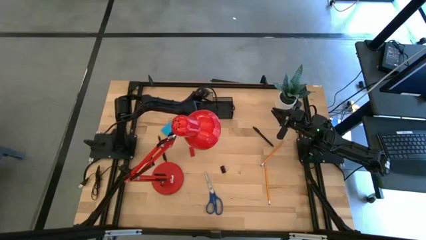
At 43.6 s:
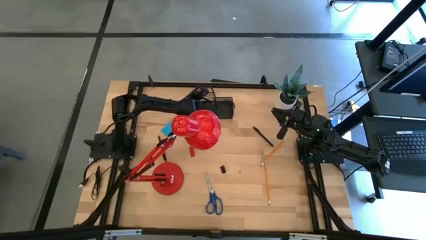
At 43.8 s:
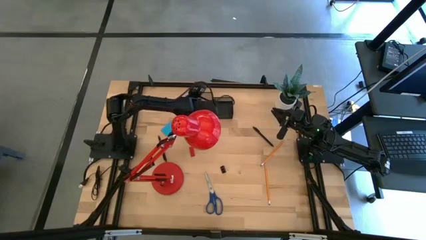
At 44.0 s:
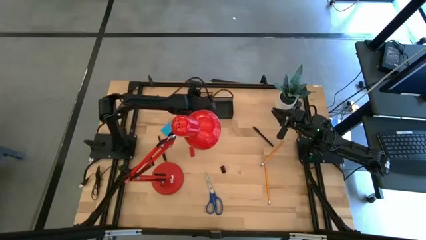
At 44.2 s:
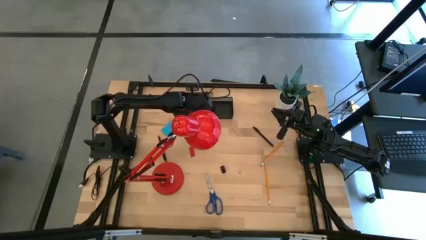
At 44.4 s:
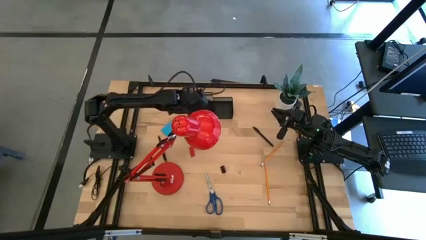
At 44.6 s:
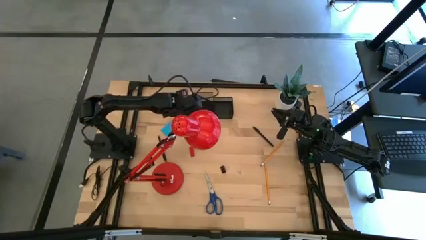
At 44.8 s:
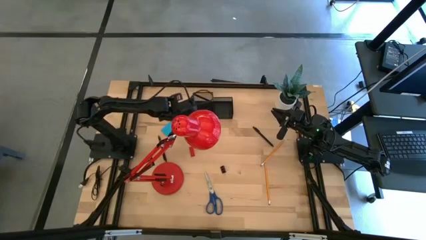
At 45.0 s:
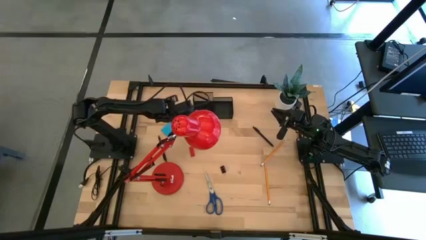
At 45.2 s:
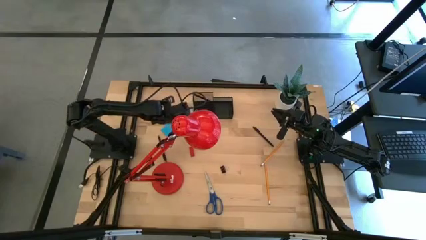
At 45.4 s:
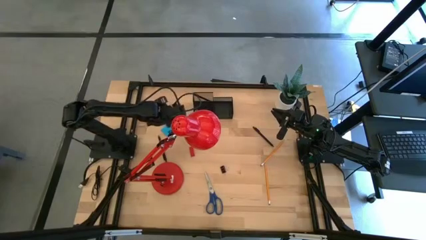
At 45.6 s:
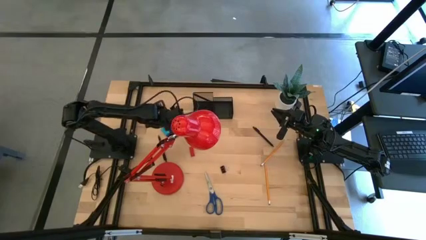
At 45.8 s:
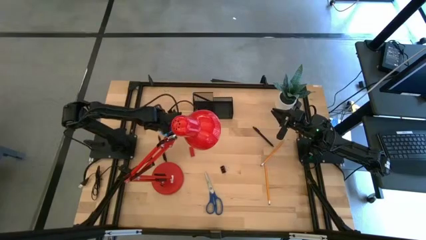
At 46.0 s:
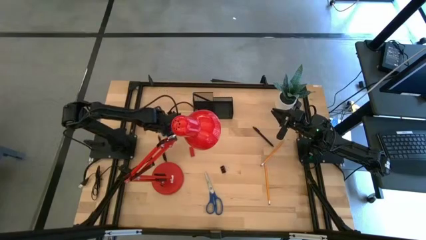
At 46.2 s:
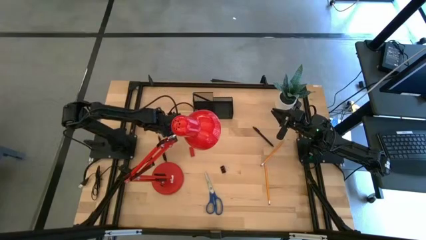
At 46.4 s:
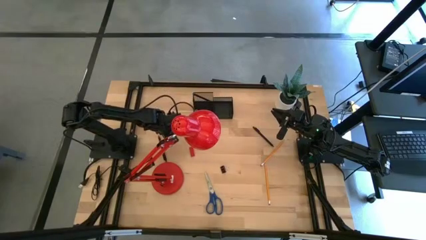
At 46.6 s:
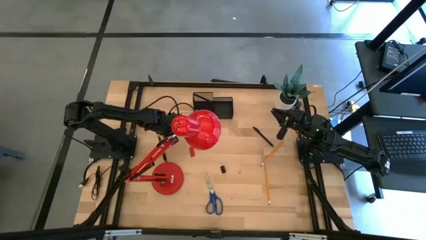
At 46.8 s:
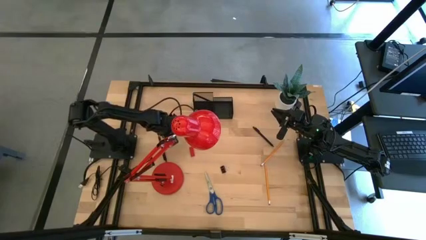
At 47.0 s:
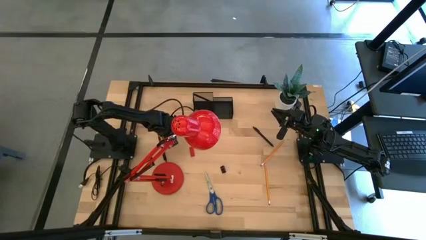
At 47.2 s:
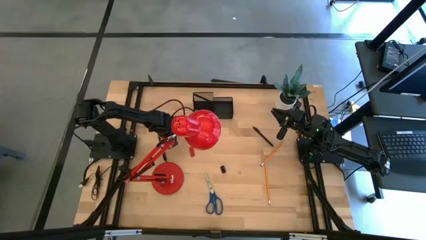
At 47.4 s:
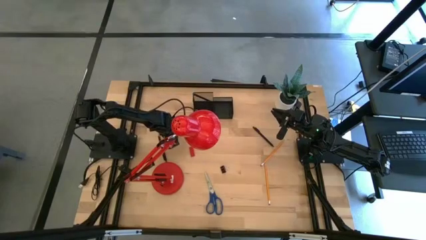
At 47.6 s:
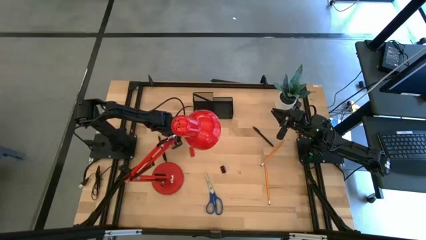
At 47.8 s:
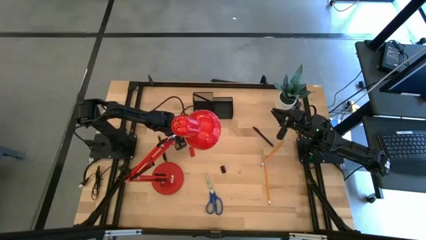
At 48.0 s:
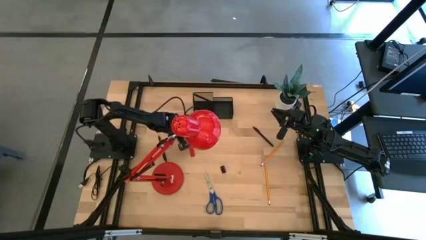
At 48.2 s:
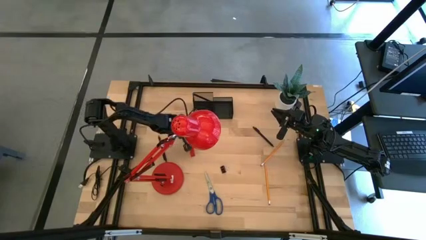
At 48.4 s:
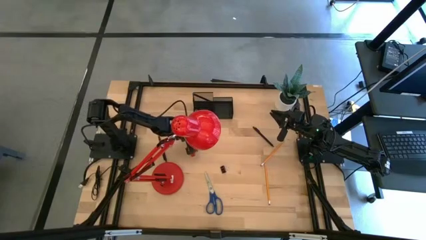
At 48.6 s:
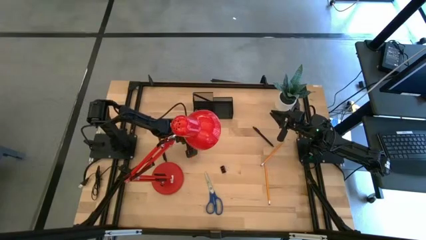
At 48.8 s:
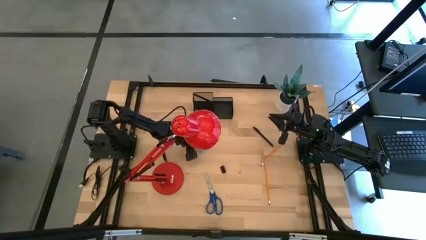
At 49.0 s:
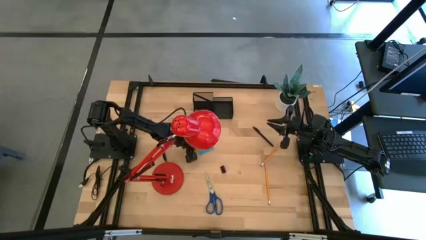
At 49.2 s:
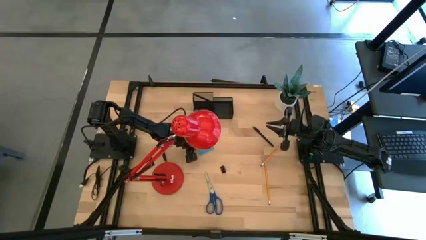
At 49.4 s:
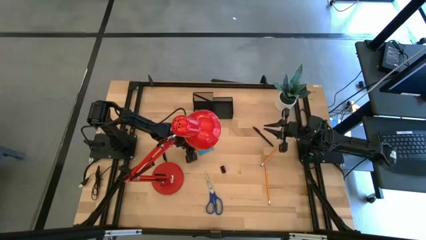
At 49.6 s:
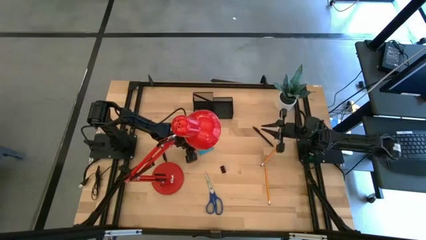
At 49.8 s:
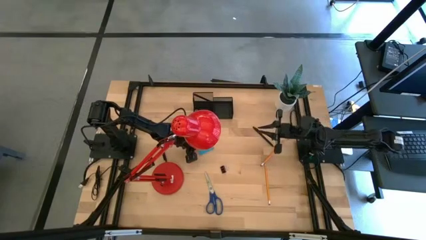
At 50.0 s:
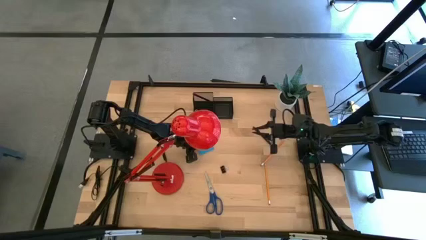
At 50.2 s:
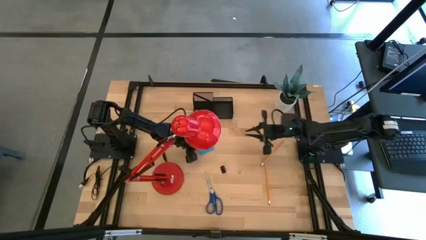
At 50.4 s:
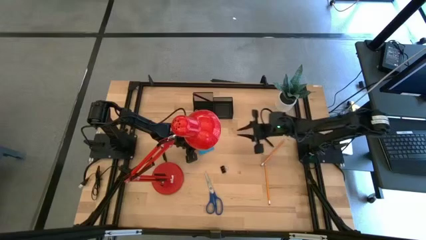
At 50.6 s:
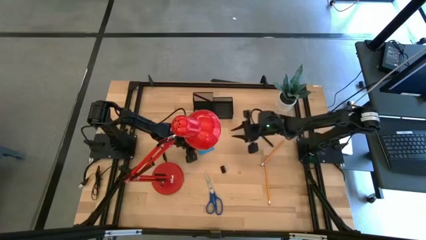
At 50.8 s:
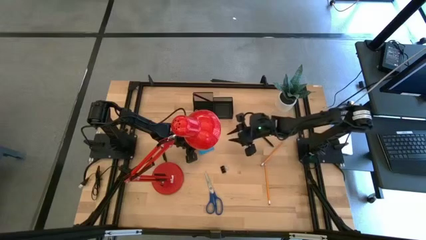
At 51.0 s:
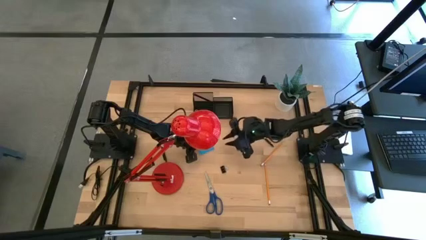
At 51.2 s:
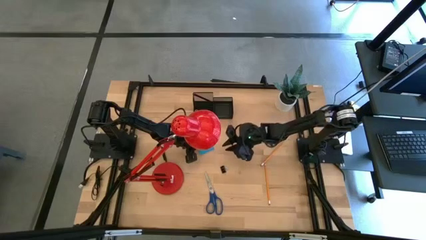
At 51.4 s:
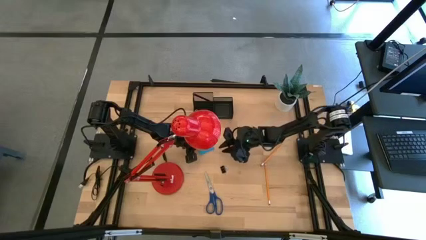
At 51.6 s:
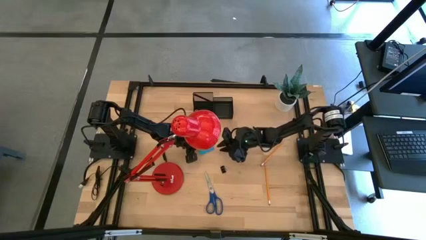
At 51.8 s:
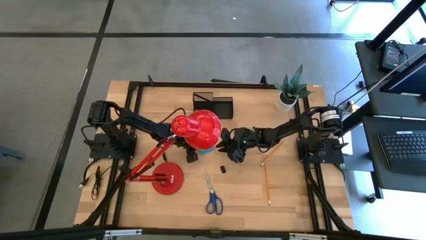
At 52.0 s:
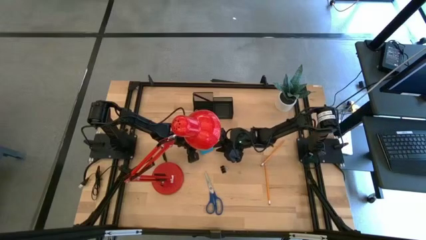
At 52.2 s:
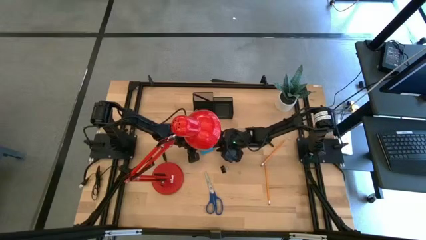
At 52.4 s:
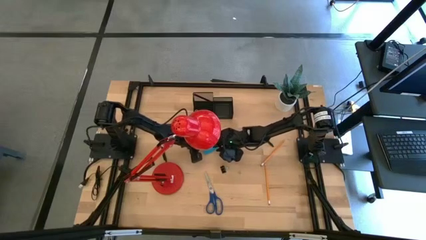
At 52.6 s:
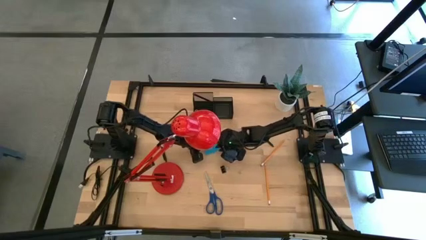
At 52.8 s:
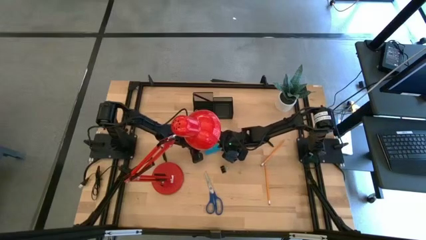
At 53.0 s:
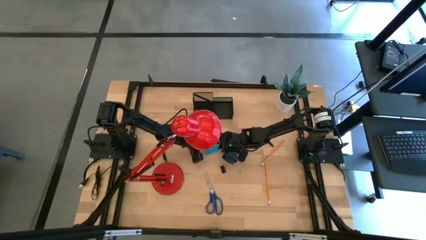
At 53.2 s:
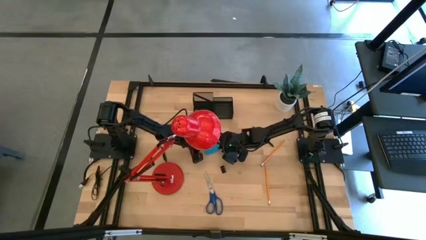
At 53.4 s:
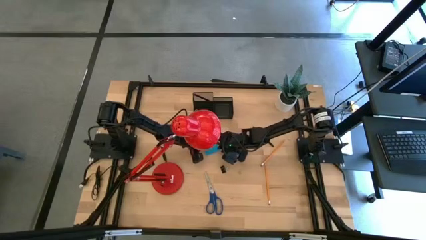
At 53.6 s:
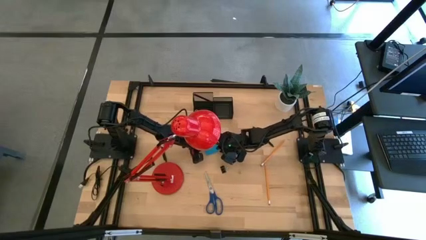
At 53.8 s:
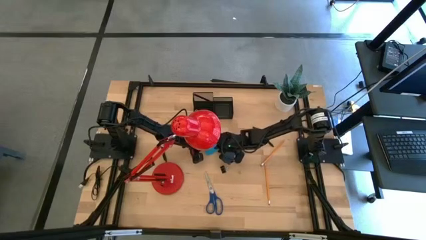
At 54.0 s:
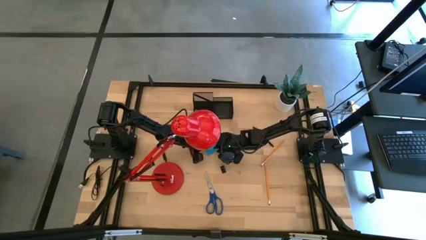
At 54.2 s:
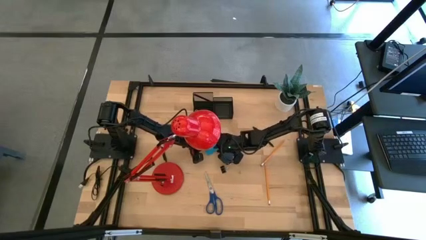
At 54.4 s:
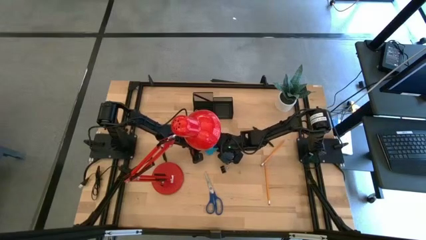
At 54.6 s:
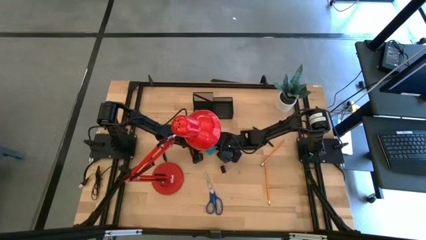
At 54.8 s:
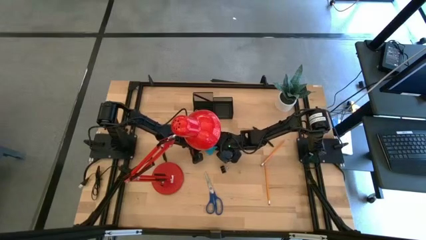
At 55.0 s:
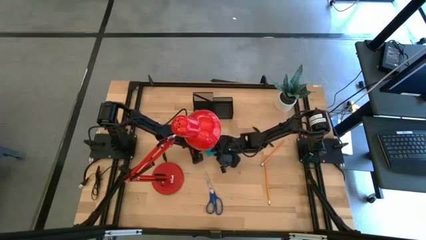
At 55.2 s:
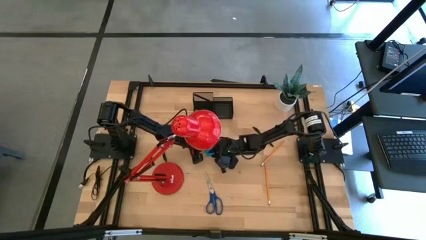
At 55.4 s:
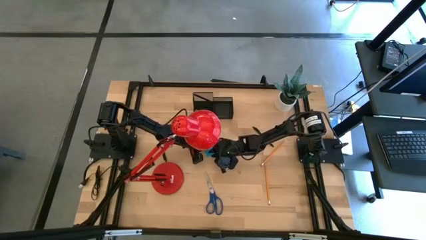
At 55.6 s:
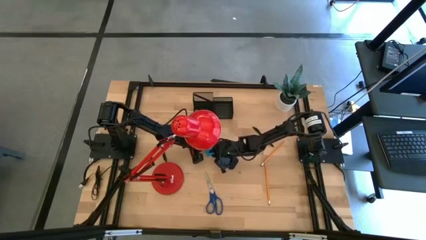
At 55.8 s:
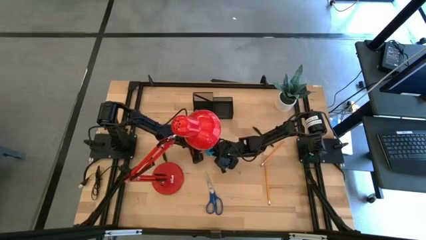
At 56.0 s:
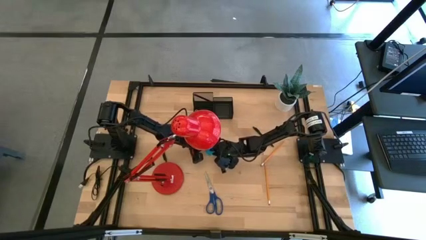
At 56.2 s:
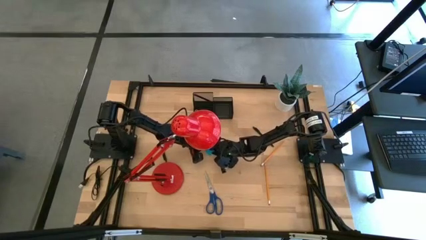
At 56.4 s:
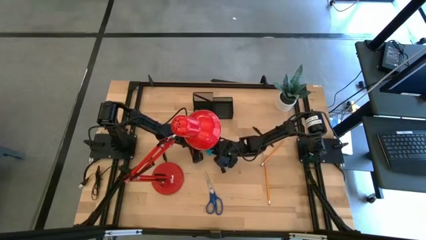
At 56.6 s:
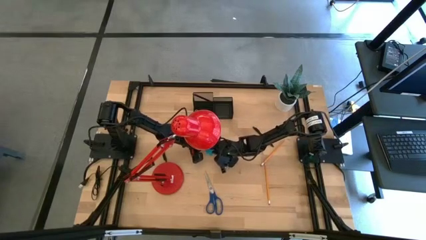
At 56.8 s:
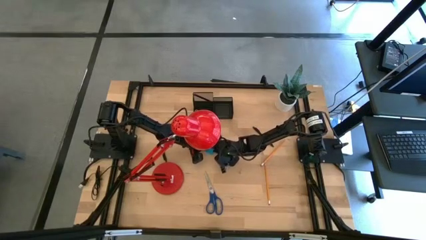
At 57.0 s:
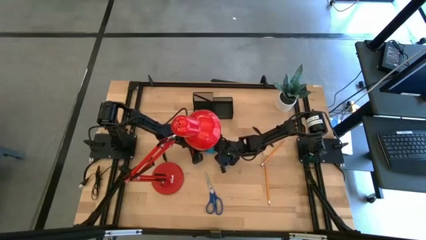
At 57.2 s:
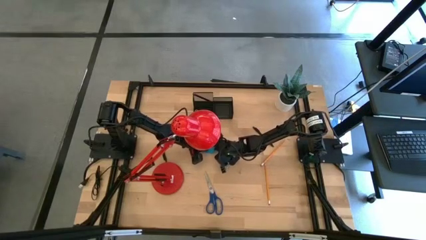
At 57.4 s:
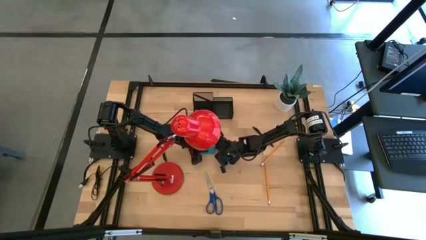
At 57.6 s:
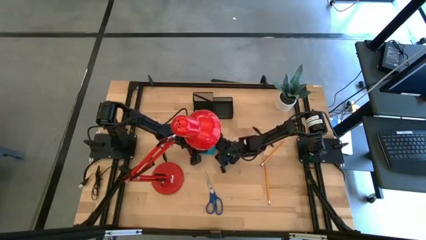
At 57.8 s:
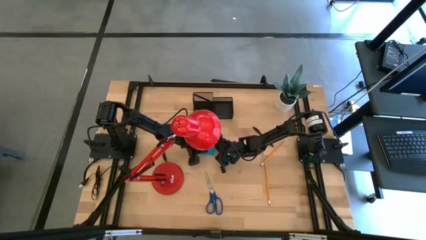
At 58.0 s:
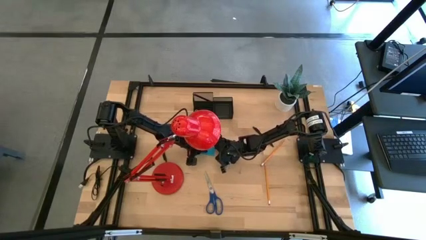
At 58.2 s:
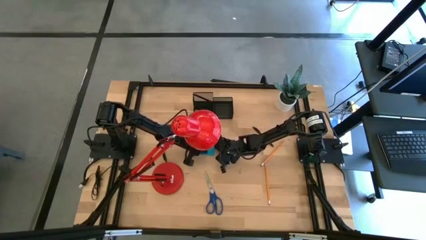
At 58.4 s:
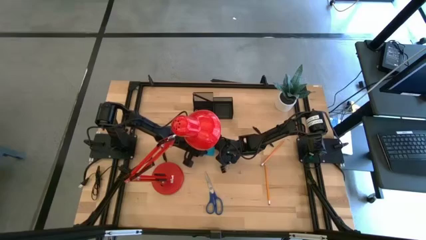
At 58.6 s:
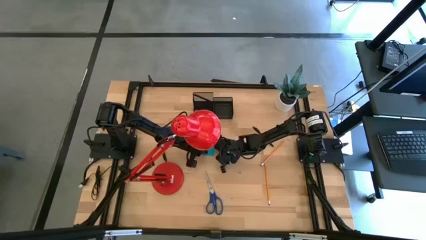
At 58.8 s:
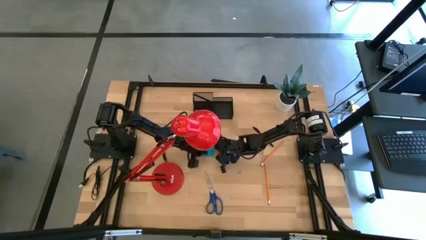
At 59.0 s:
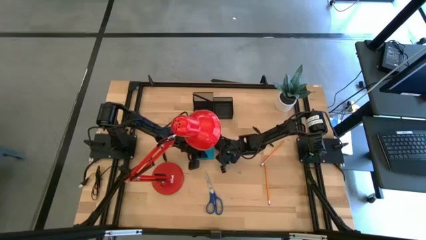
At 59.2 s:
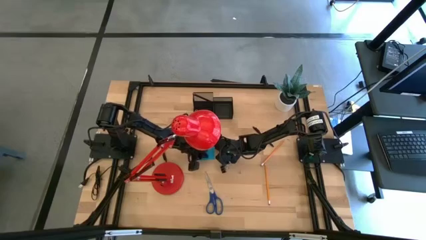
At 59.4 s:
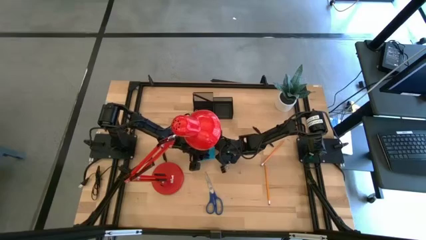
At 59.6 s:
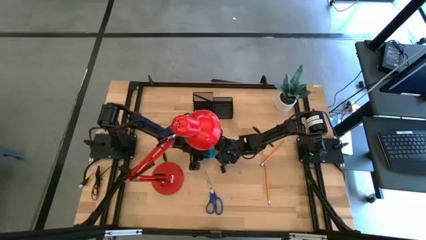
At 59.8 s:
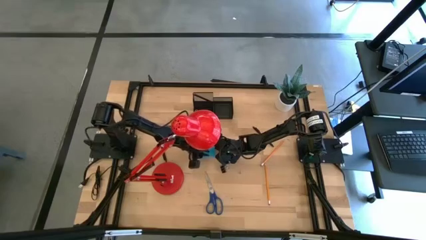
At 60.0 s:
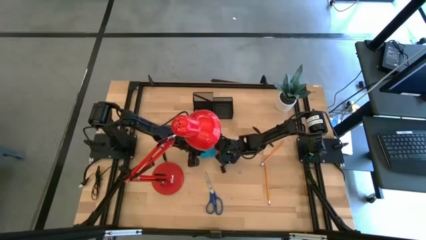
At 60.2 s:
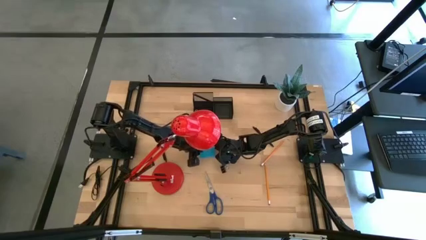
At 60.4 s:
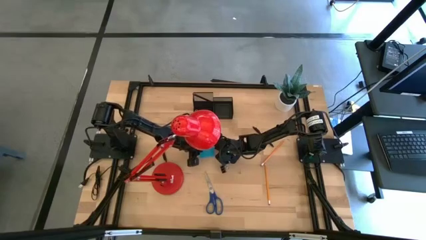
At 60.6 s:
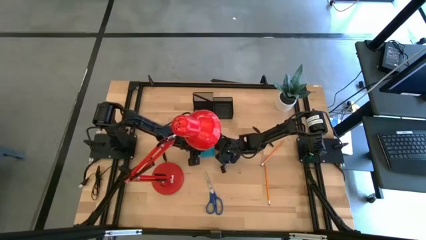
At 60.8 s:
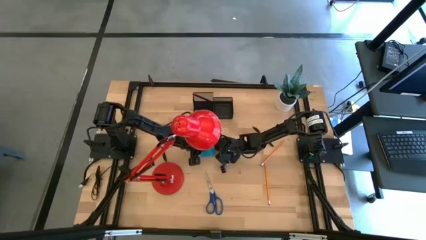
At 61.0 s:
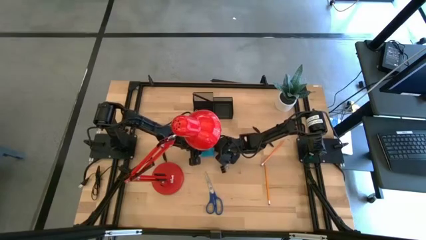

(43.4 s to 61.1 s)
Task: Pick and place office supplies into organizer
Put the sticky notes into the desk organizer
